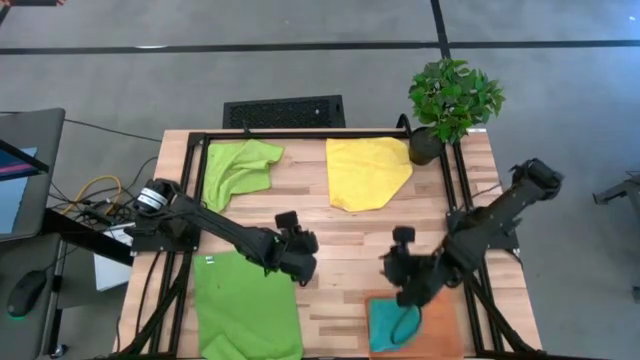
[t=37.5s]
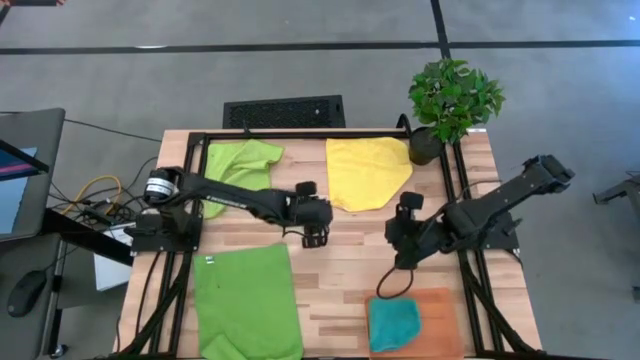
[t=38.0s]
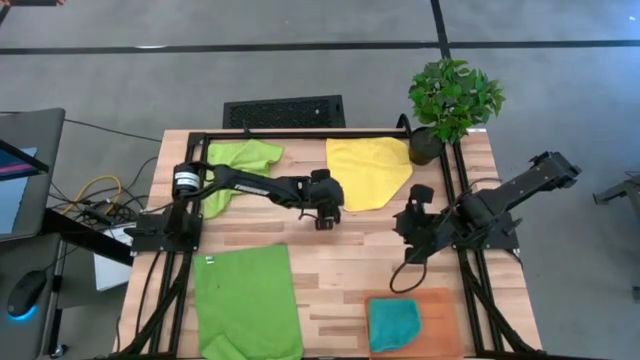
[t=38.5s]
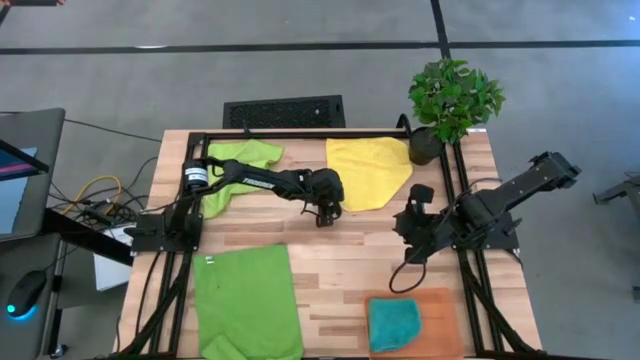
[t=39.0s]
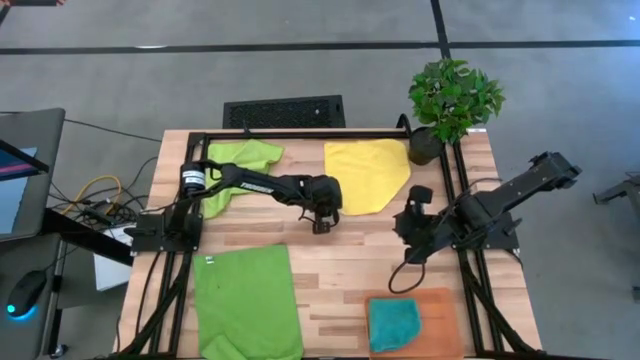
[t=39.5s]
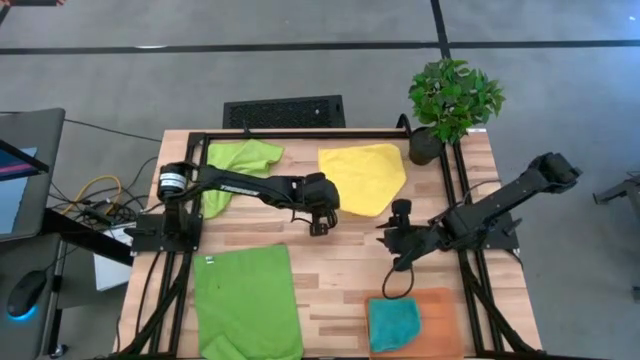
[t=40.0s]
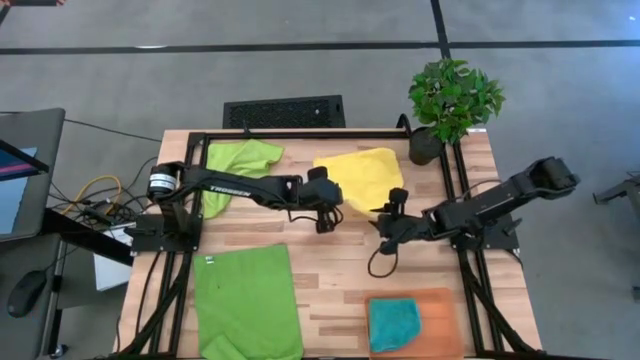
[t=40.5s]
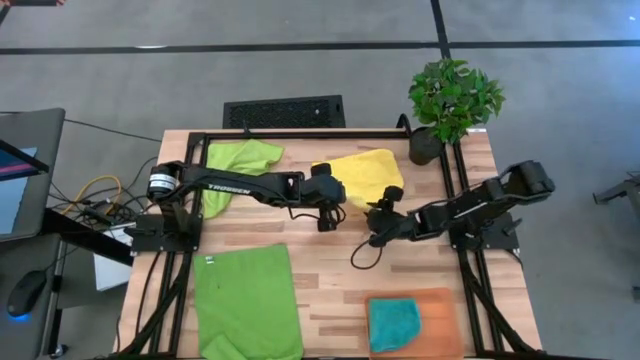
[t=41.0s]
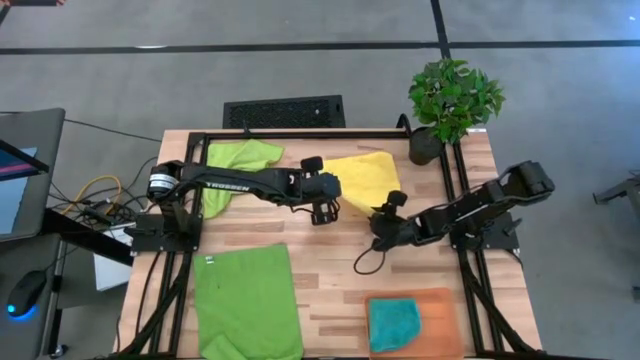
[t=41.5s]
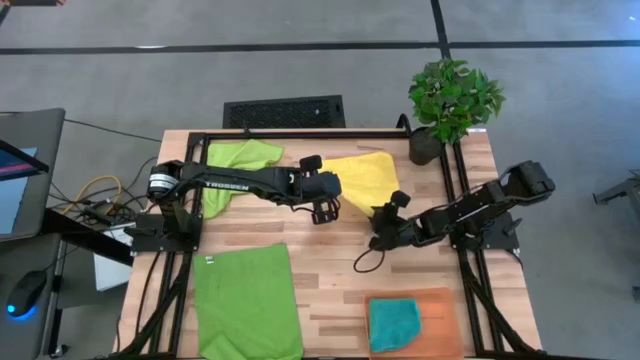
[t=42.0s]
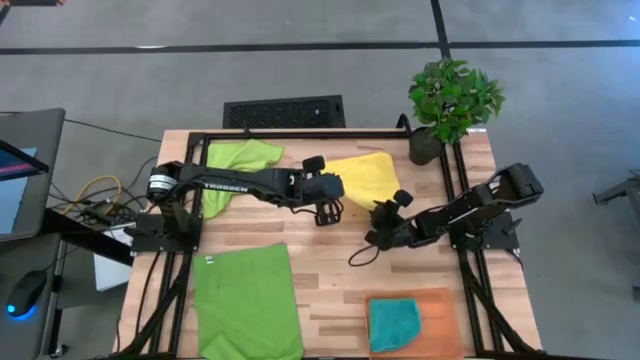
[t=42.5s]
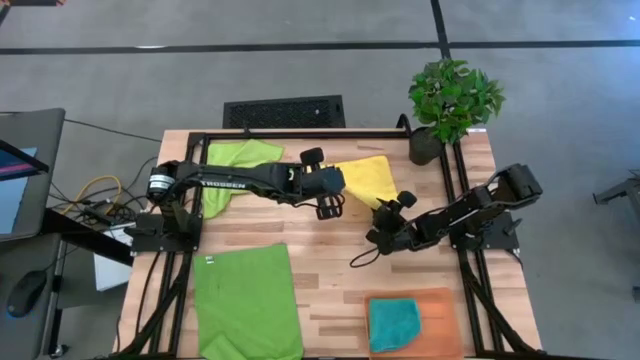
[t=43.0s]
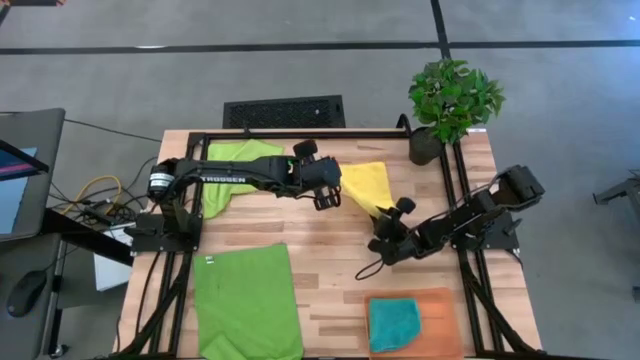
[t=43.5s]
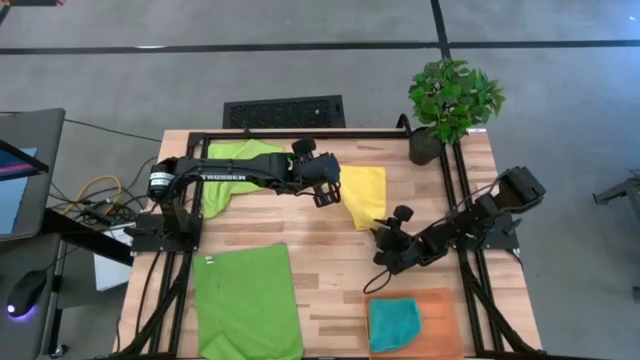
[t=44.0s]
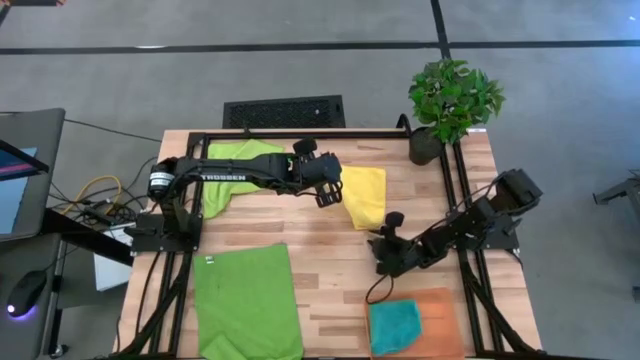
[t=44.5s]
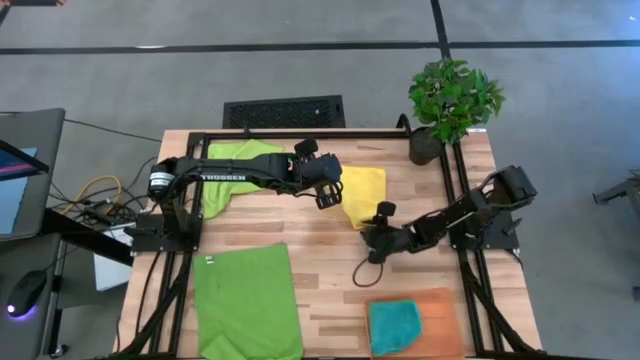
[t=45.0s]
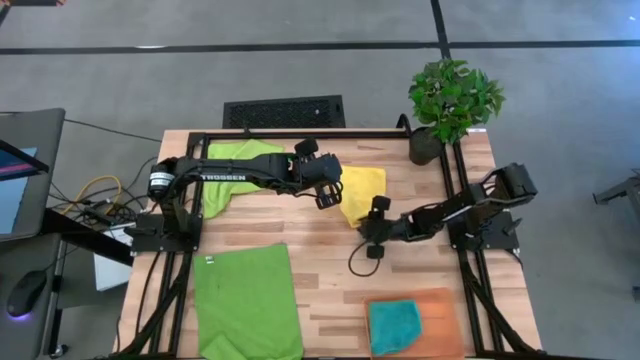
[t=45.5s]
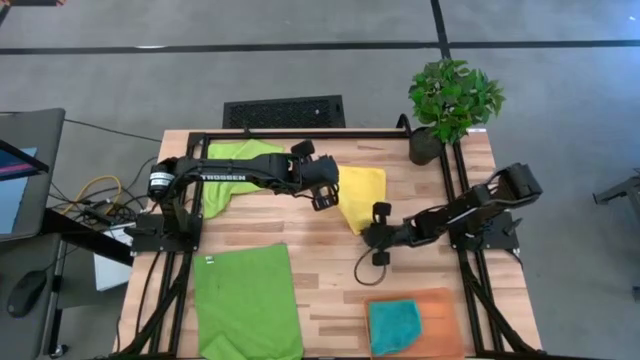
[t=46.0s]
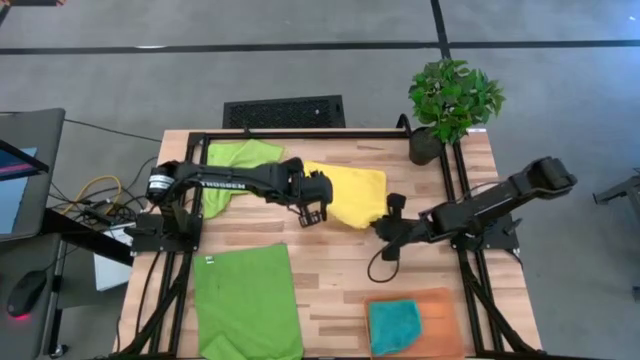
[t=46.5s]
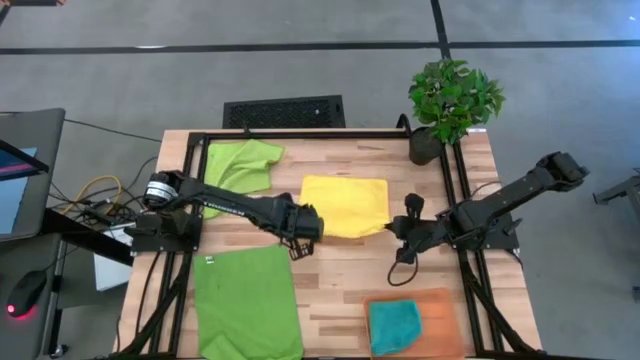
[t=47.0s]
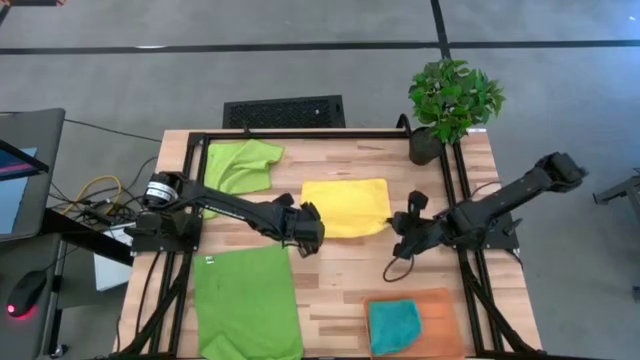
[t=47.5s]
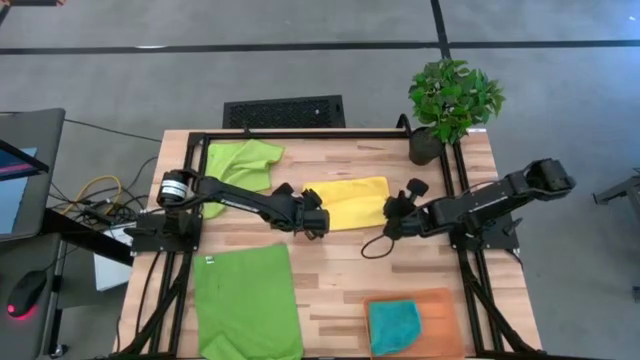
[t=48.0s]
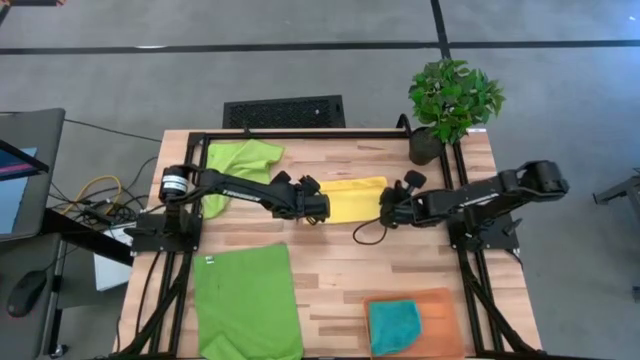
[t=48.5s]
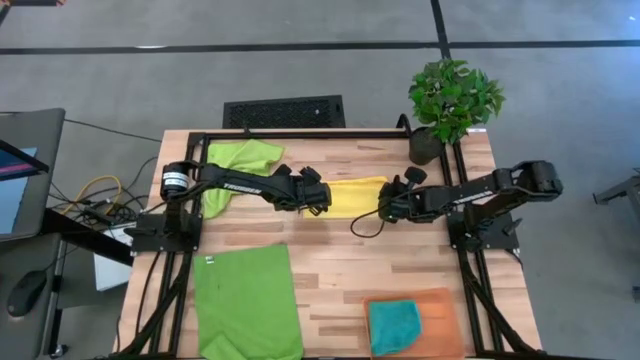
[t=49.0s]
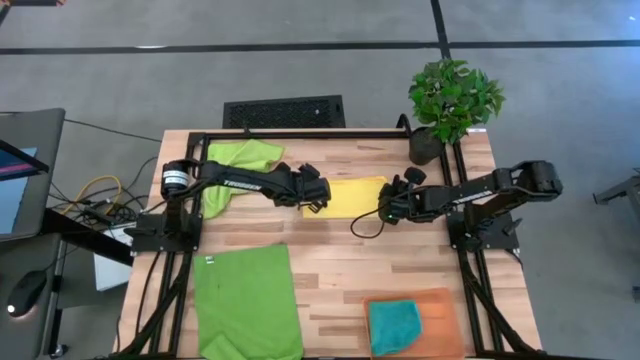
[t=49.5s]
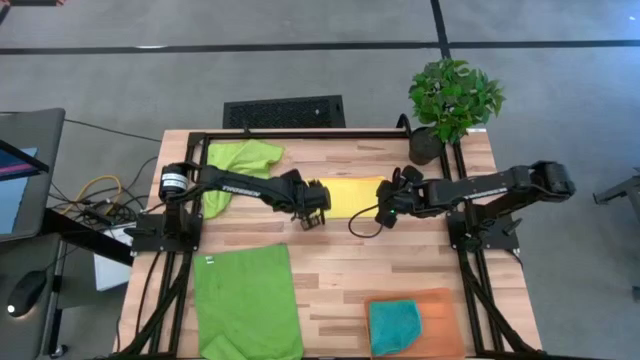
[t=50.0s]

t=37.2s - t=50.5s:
Task: Fold microfiber towels
Fold the yellow microfiber towel

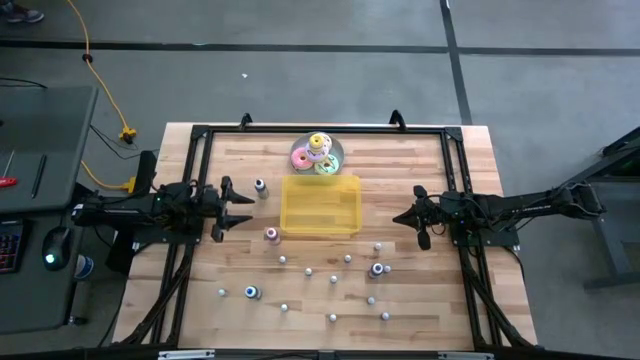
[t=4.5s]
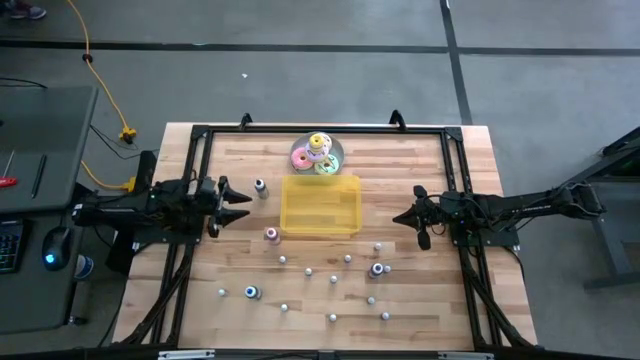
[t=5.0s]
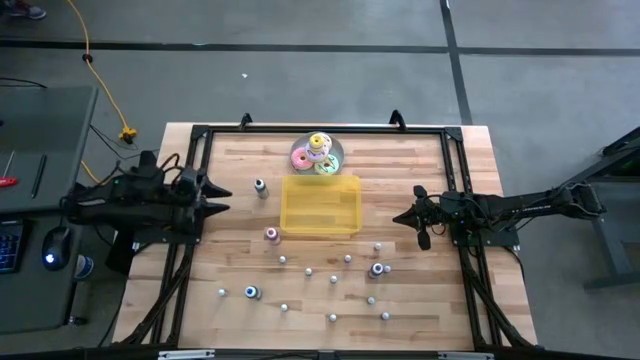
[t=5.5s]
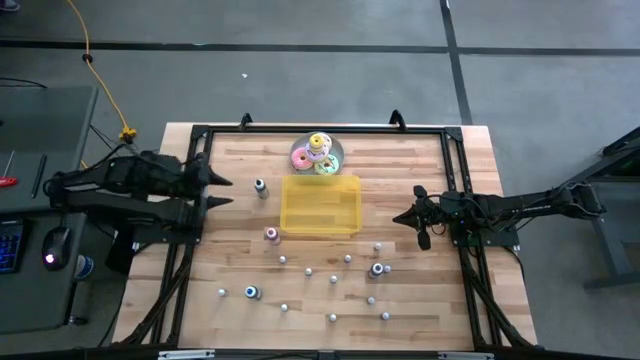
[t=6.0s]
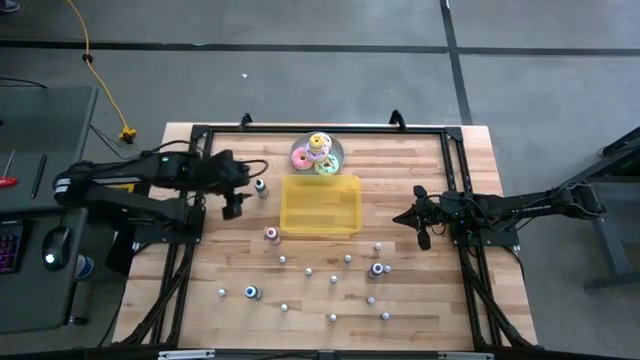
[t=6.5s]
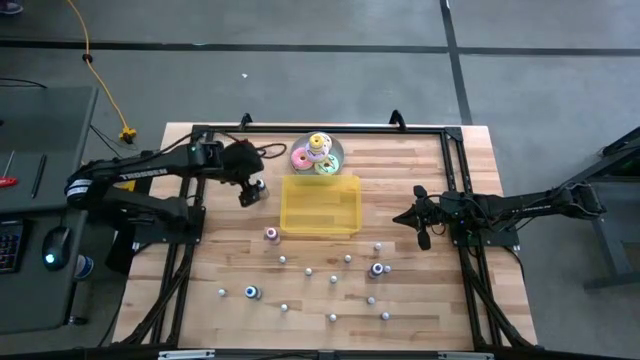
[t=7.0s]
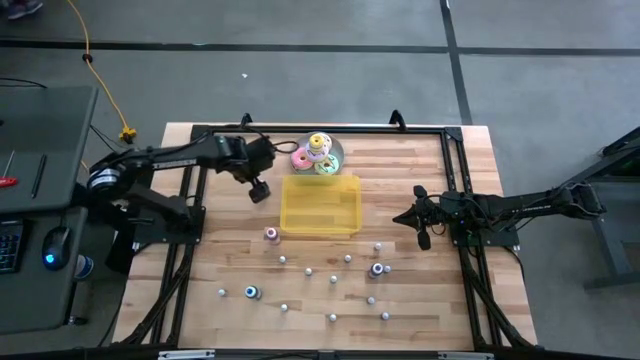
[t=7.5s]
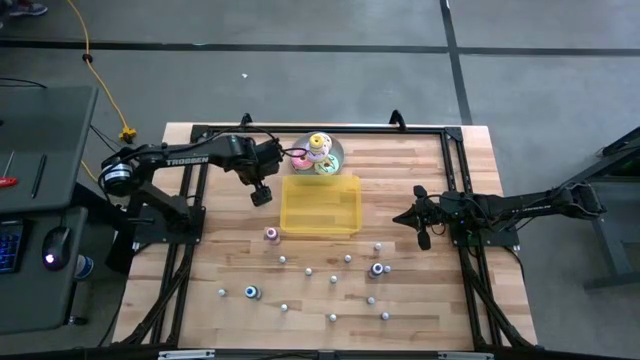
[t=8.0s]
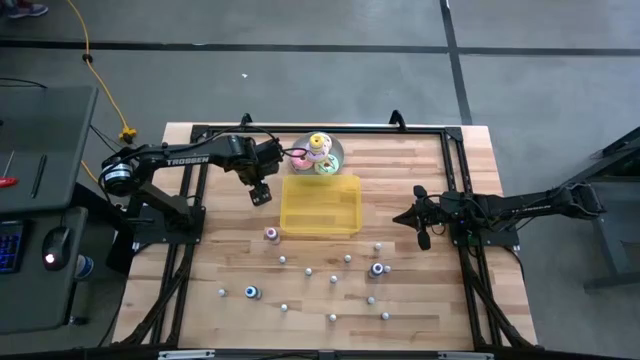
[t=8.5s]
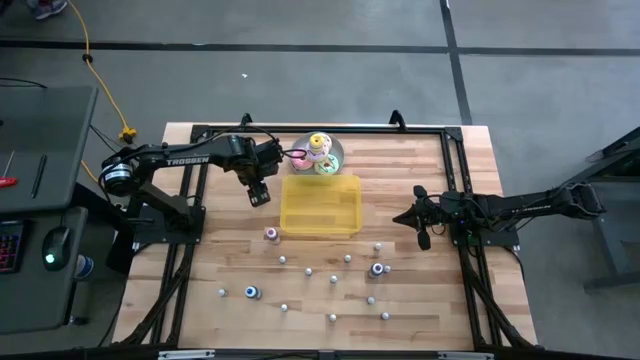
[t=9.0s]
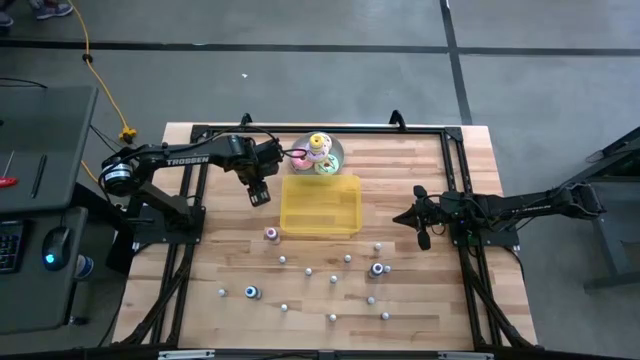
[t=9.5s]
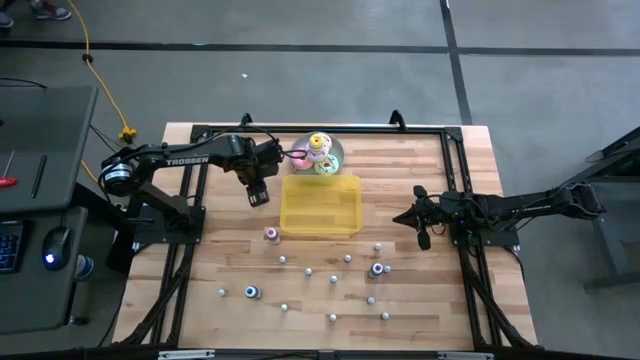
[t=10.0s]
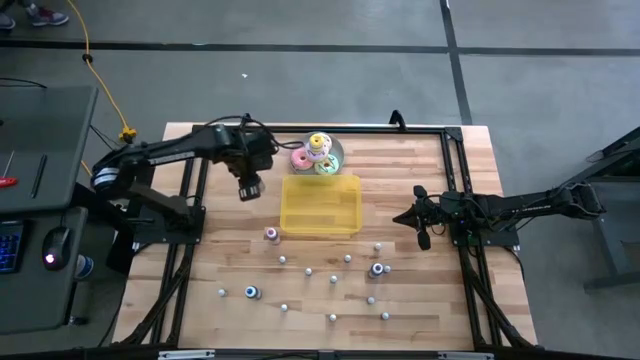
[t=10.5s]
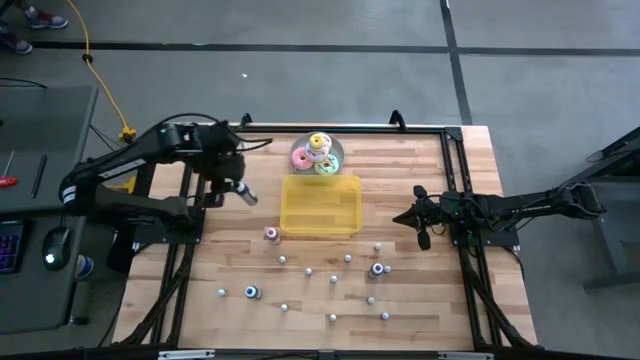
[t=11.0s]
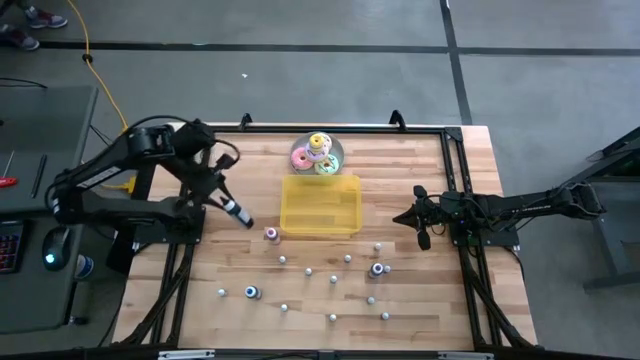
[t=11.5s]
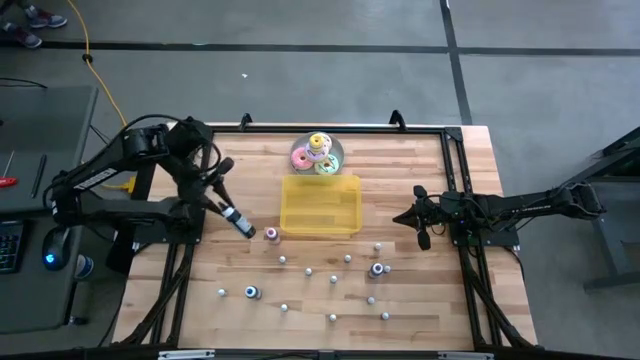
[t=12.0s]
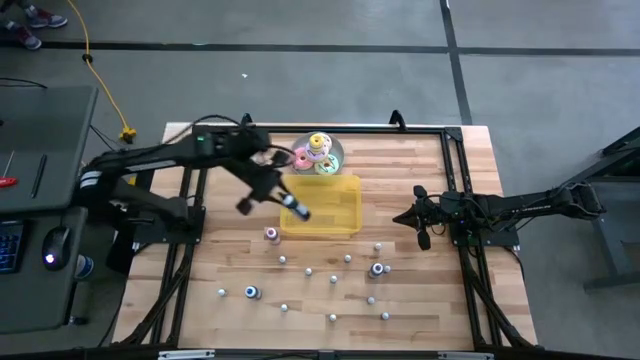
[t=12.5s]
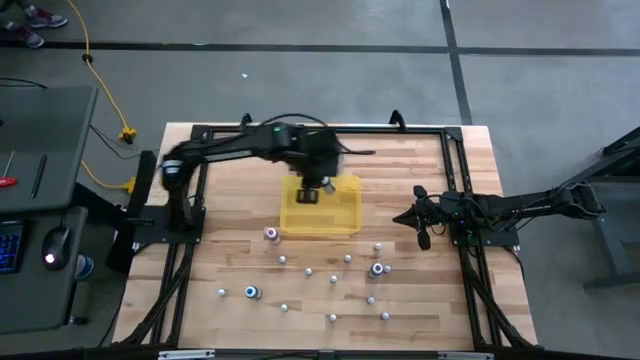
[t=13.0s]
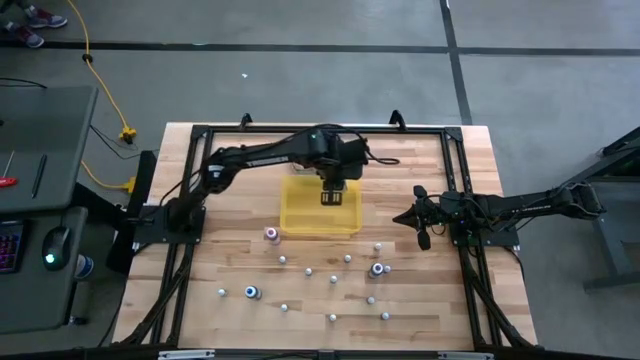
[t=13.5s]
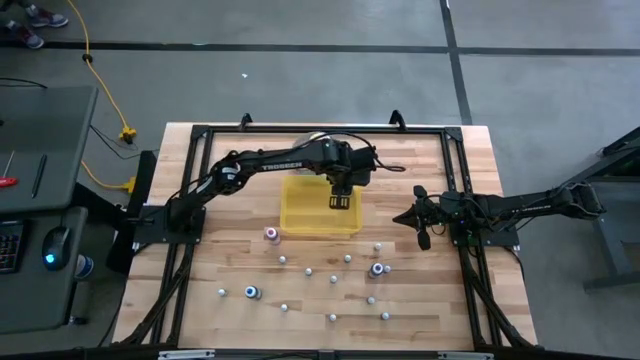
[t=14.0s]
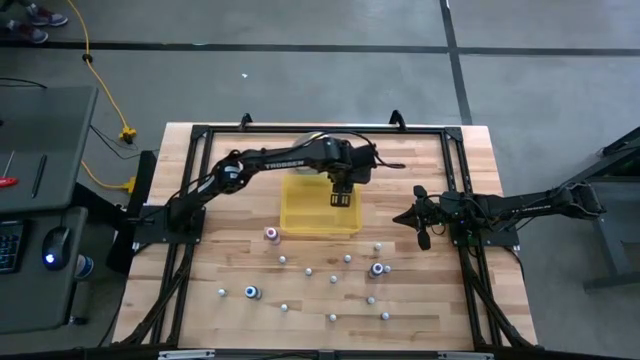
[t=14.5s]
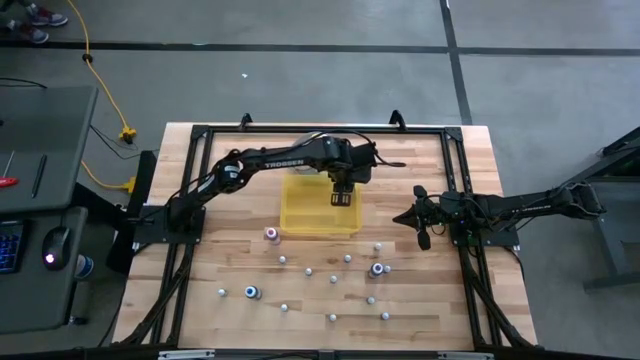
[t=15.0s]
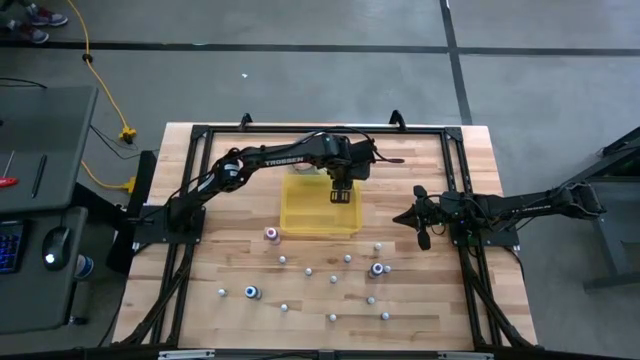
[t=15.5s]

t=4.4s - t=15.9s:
Task: Pick & Place food coloring
Put the large black food coloring bottle into the yellow container
